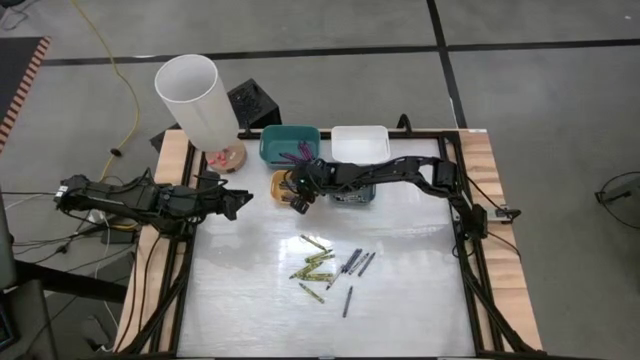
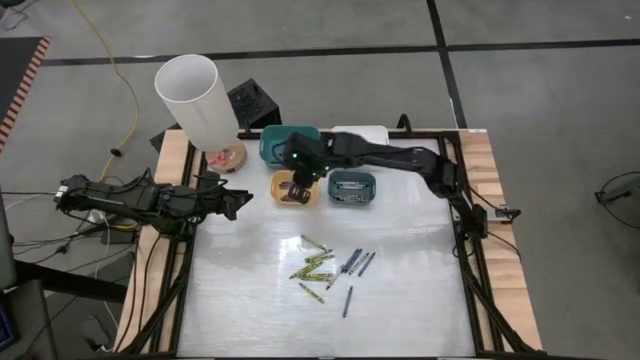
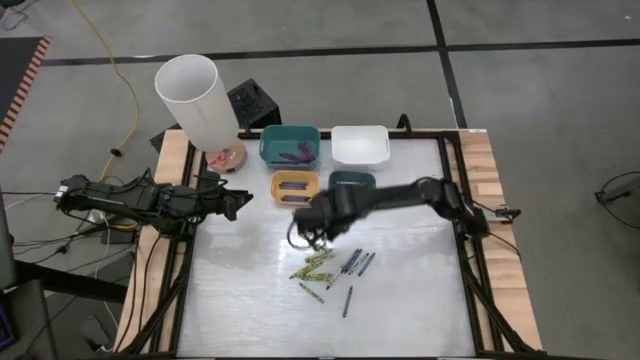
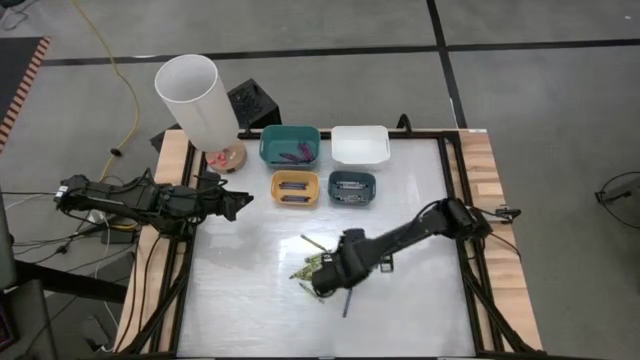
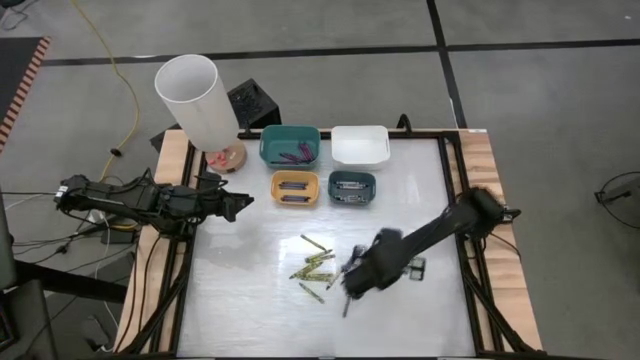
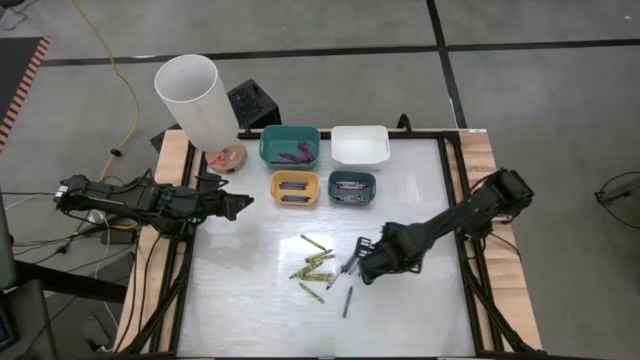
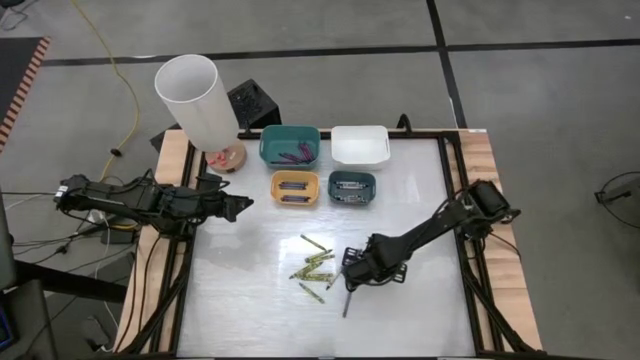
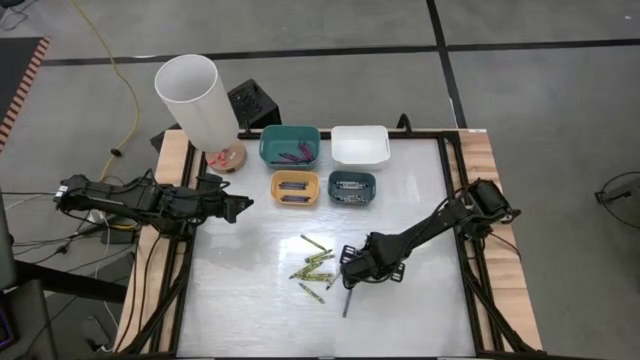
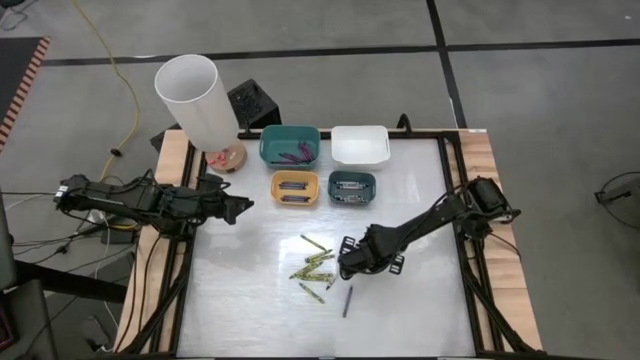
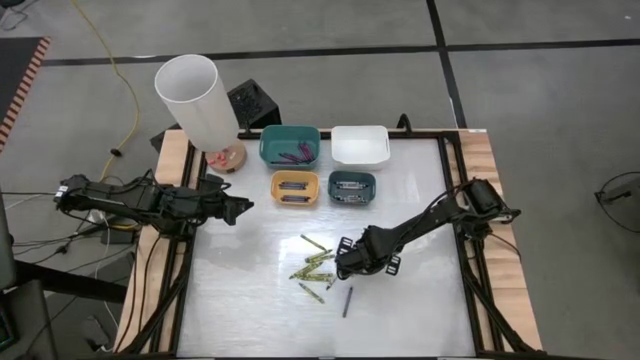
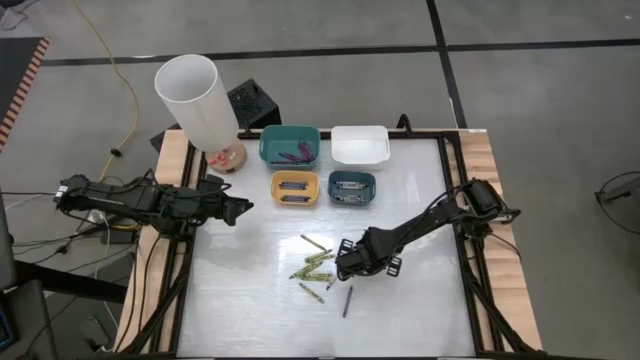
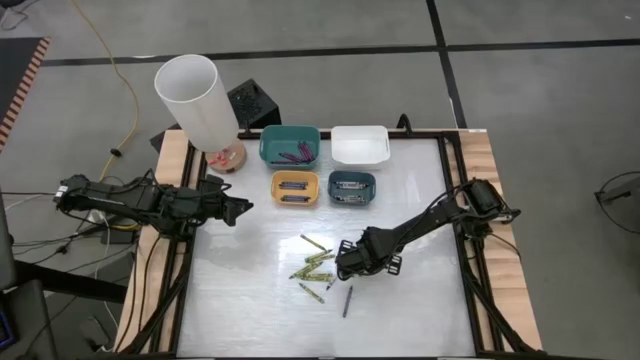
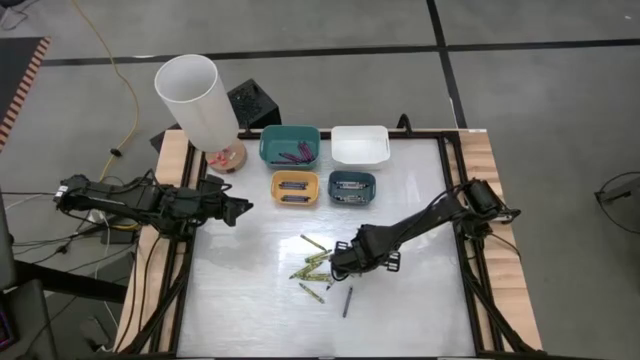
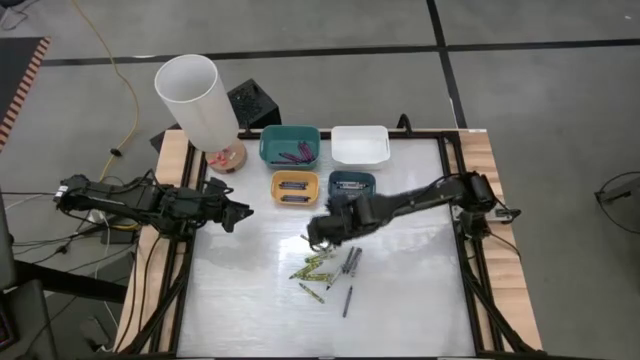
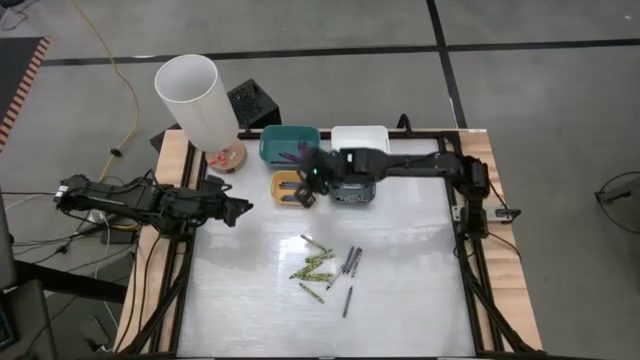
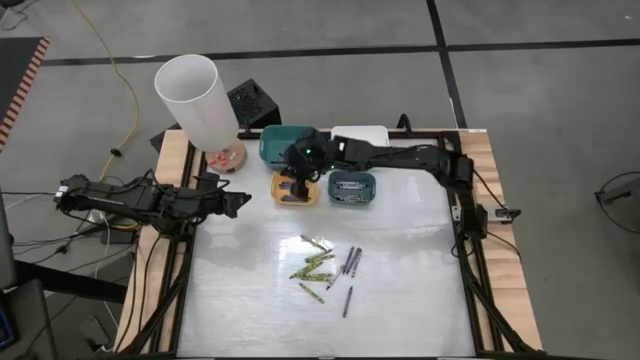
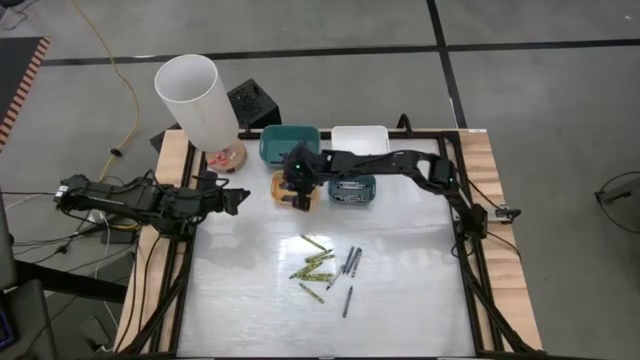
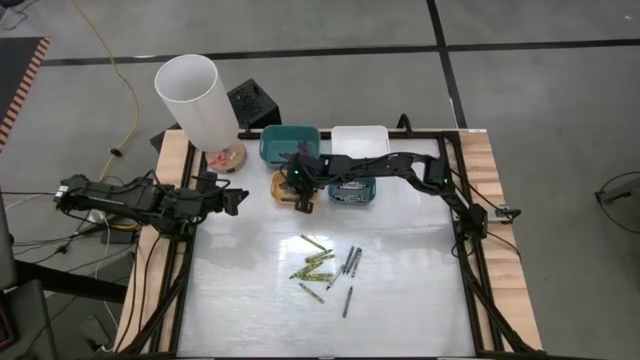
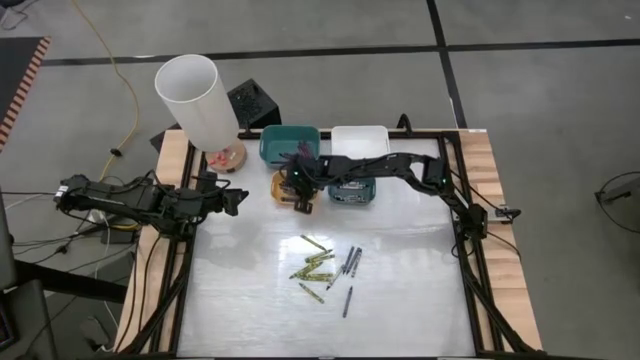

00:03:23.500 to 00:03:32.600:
Task: Sort crayons
Put the blue crayon into the yellow bin

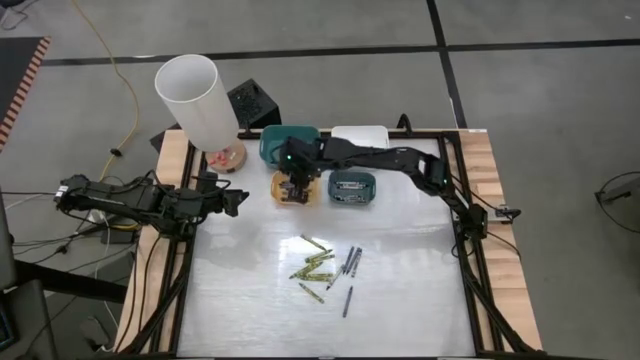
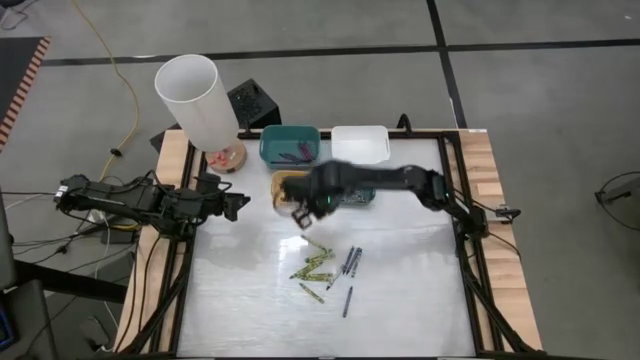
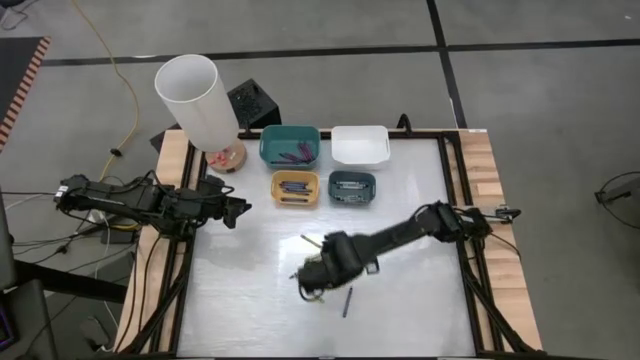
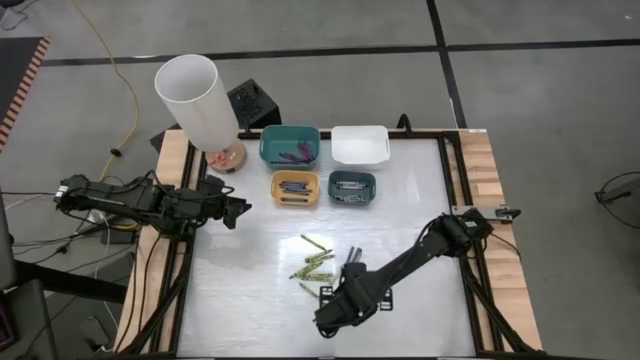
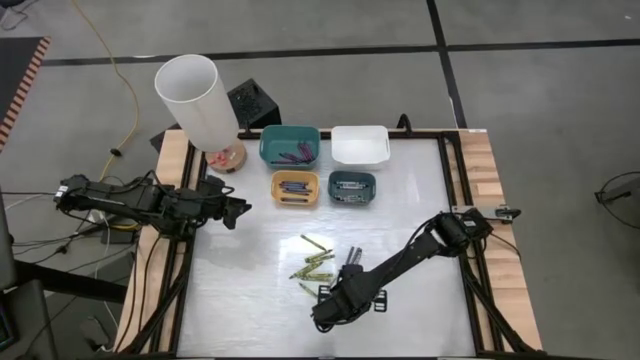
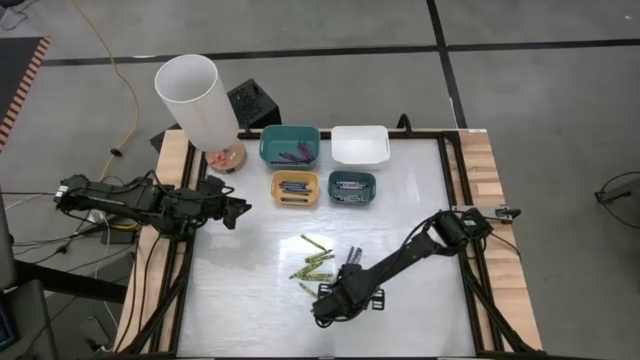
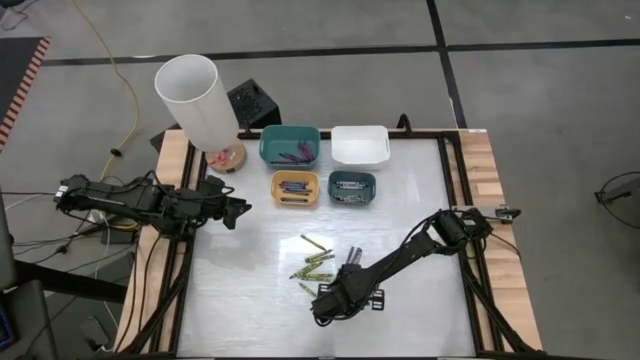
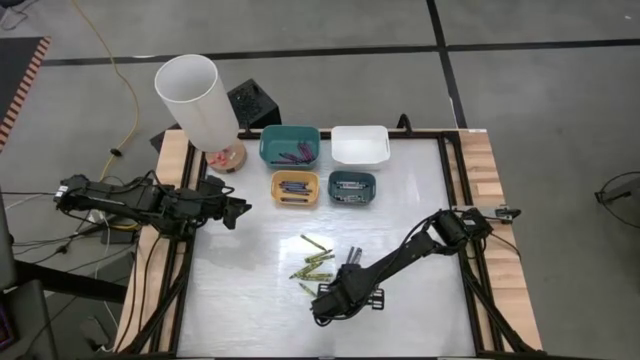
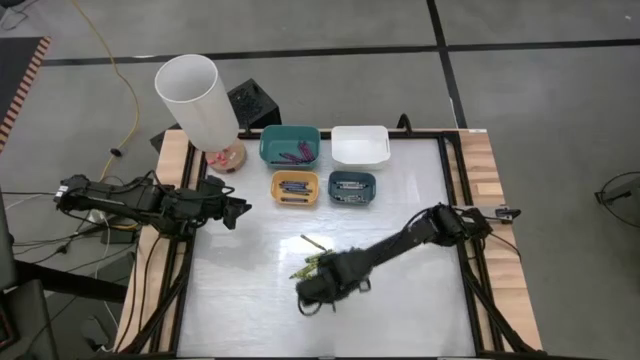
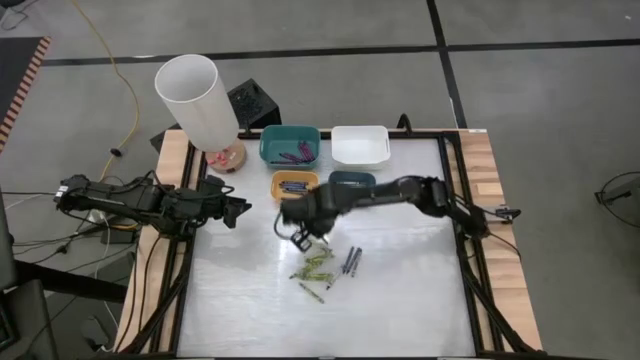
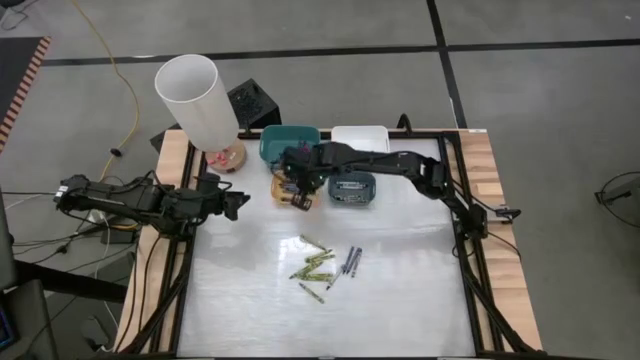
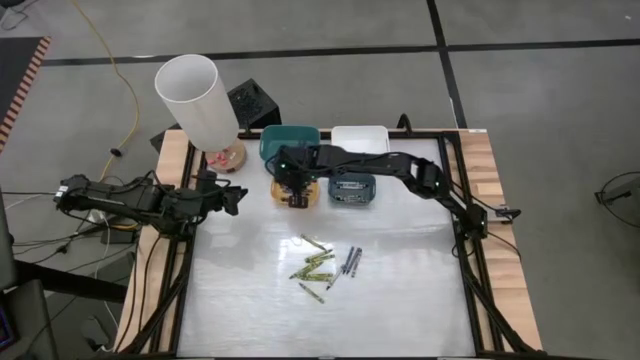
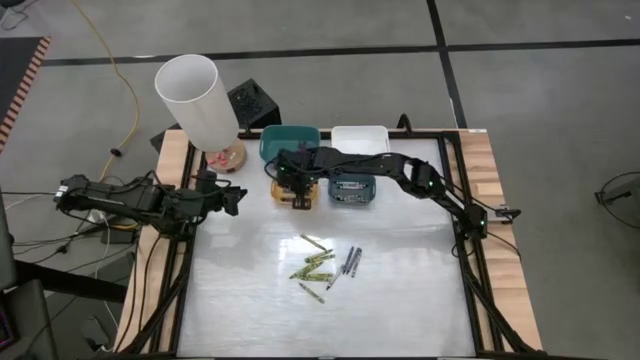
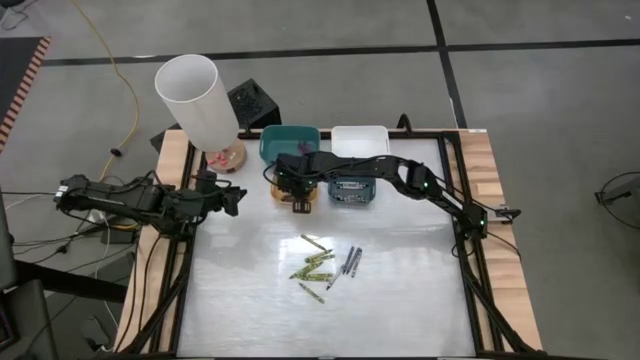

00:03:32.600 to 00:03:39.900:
Put the blue crayon into the yellow bin

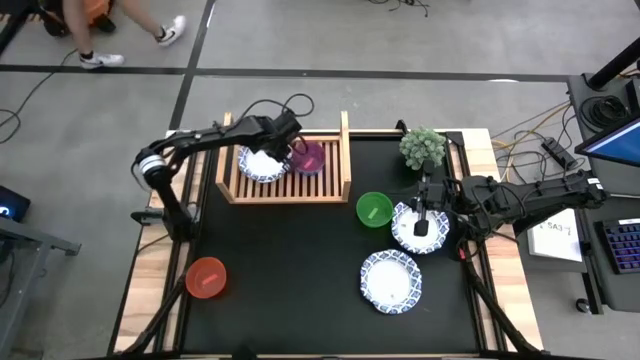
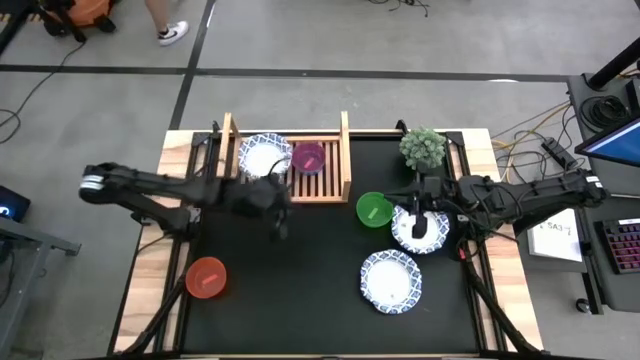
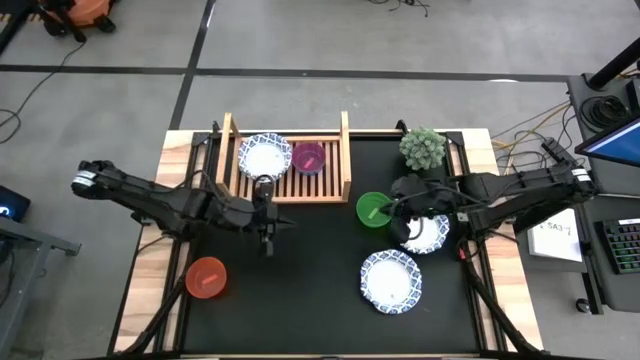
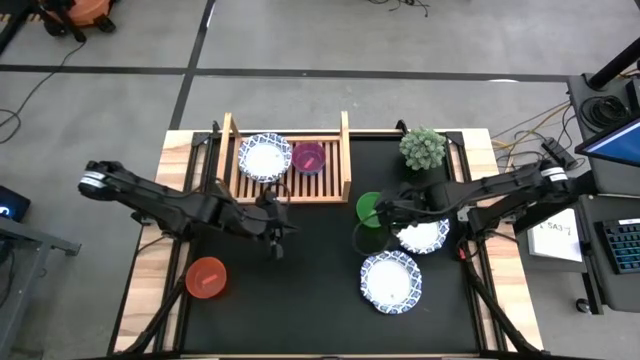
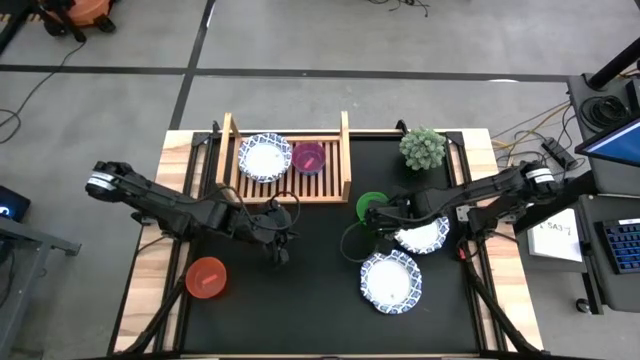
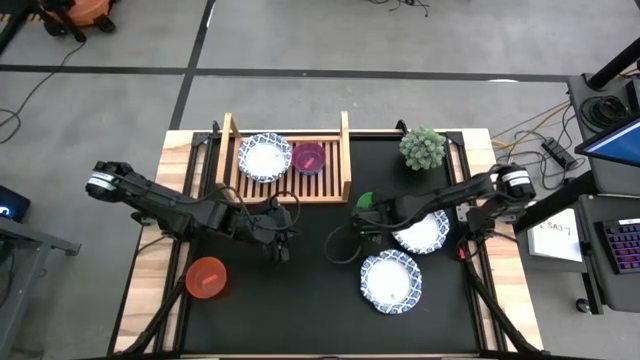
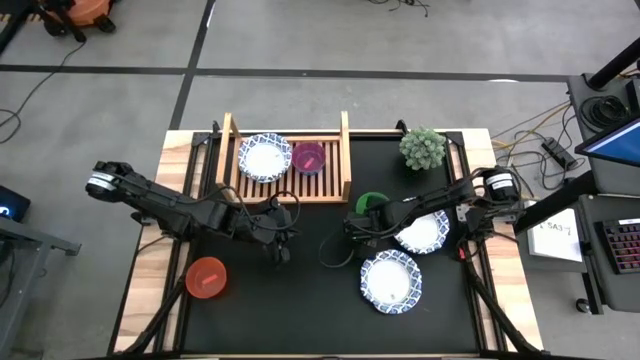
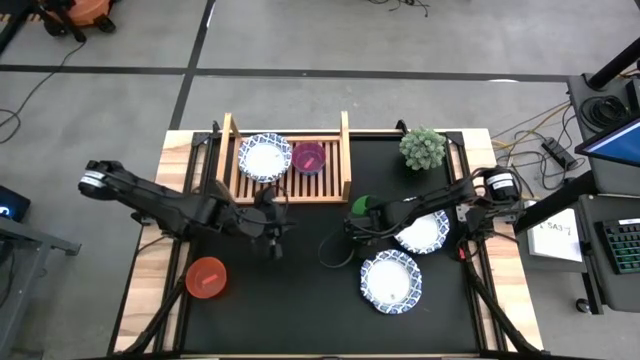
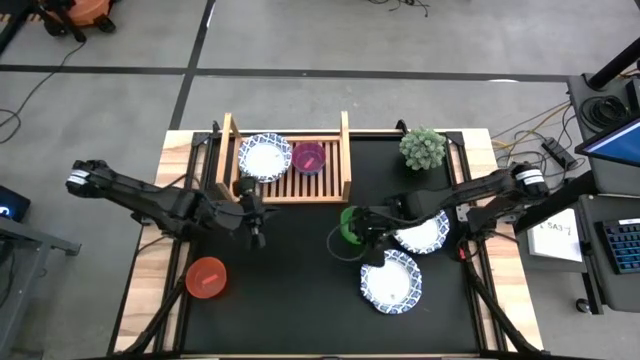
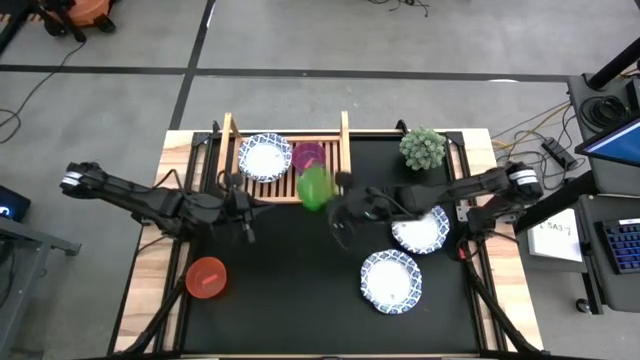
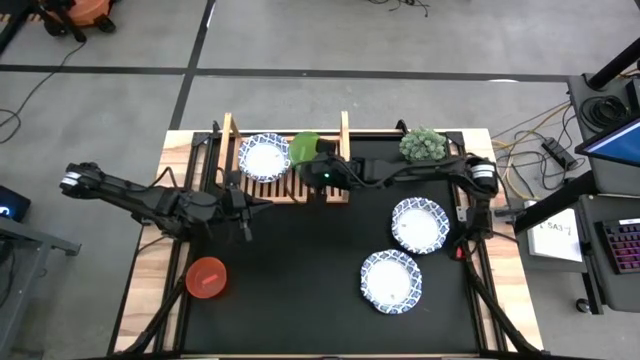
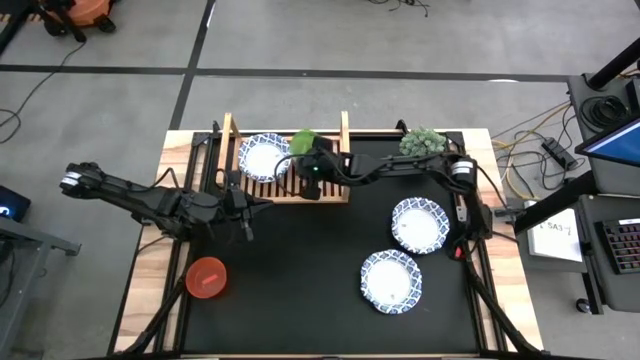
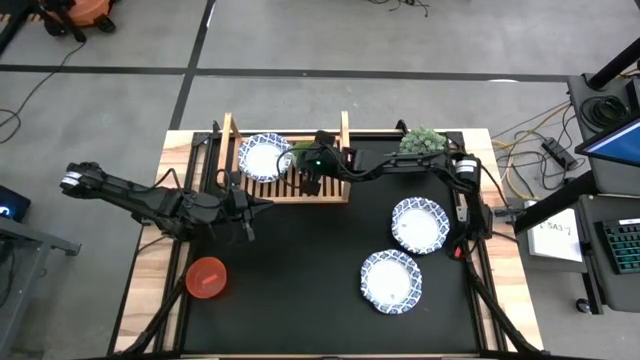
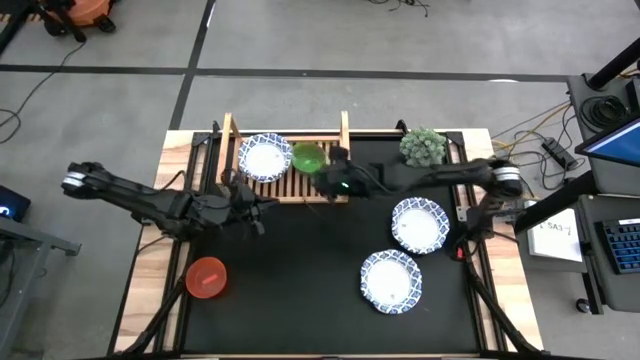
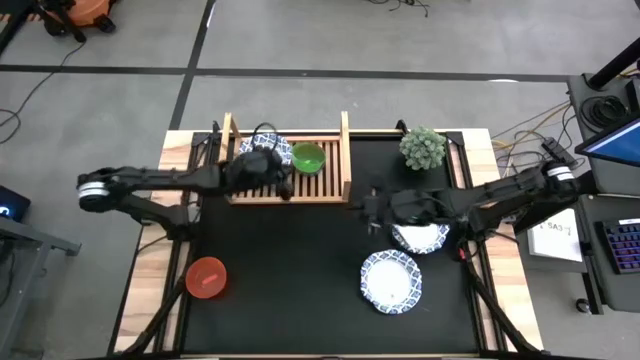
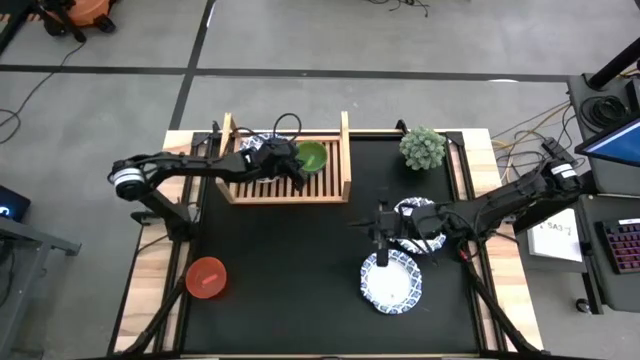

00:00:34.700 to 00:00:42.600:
Task: Place and stack bowls onto a shelf
Stack the green bowl on top of the pink bowl on the shelf
